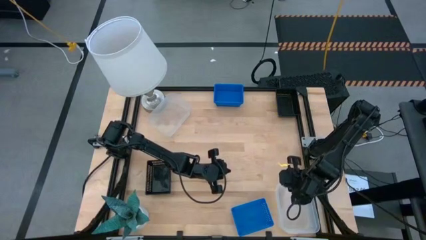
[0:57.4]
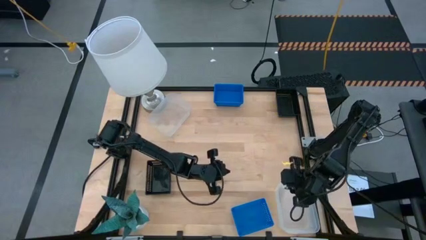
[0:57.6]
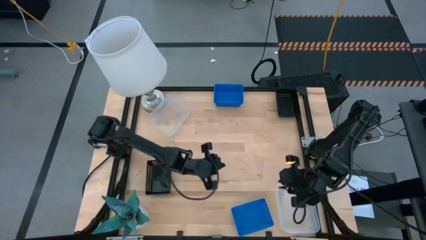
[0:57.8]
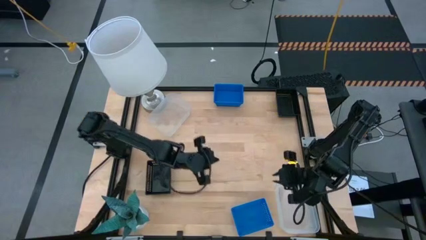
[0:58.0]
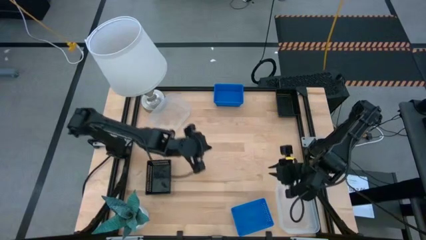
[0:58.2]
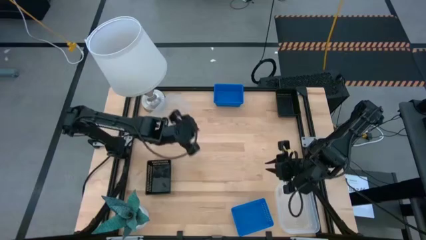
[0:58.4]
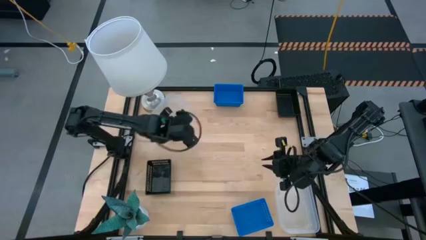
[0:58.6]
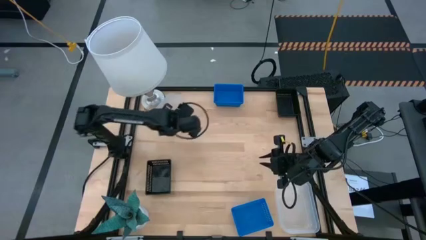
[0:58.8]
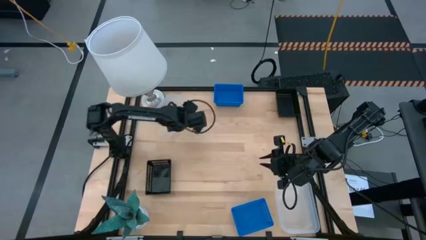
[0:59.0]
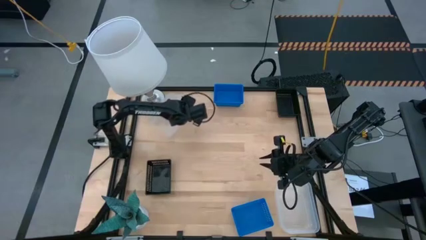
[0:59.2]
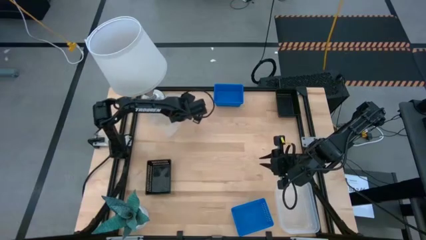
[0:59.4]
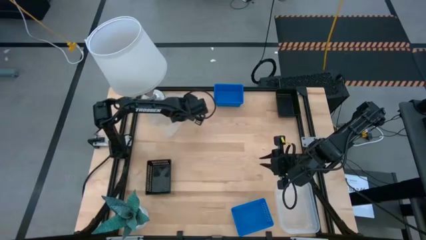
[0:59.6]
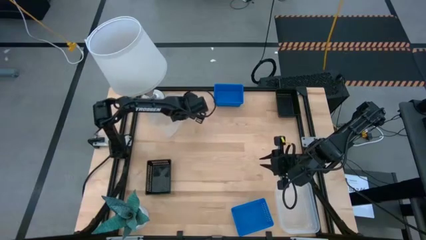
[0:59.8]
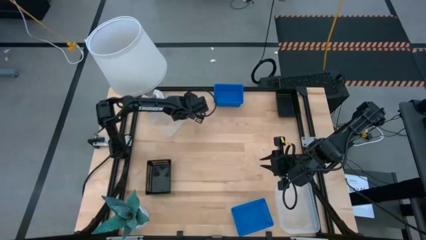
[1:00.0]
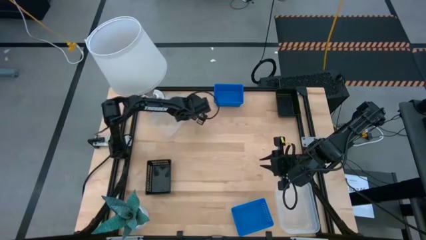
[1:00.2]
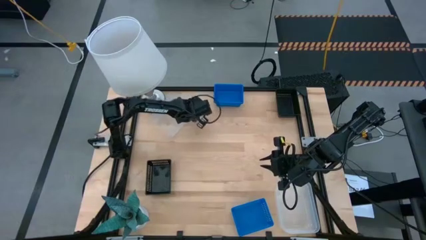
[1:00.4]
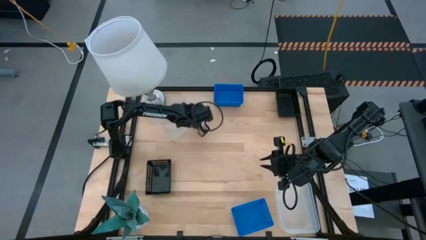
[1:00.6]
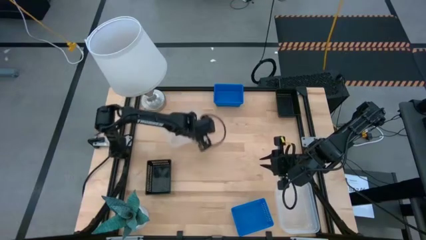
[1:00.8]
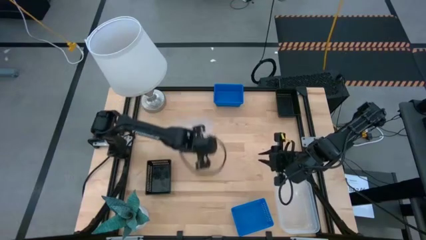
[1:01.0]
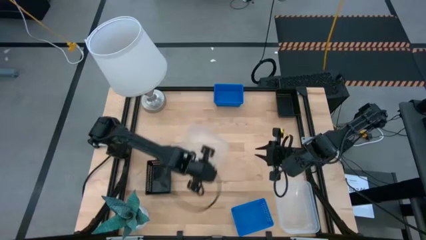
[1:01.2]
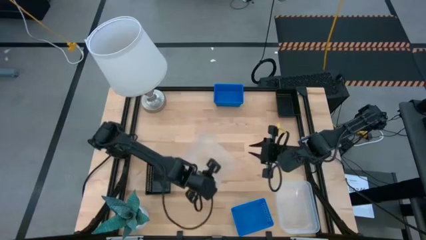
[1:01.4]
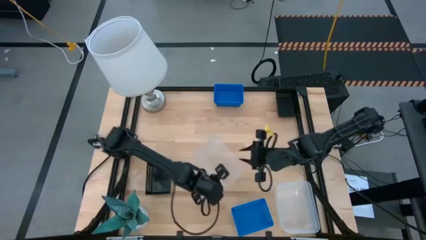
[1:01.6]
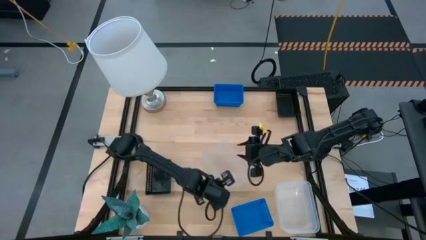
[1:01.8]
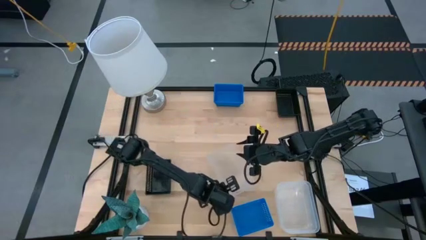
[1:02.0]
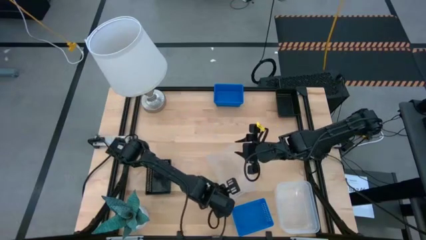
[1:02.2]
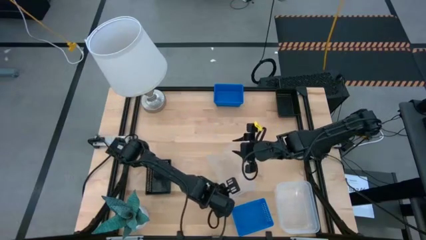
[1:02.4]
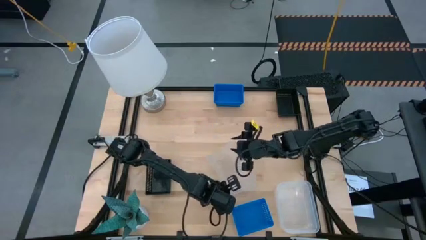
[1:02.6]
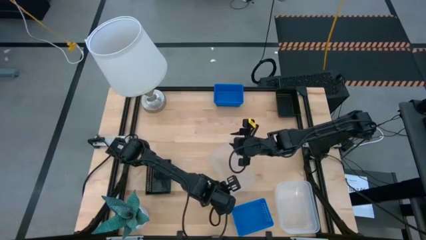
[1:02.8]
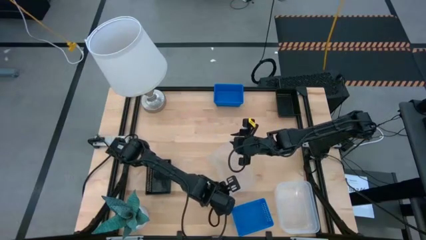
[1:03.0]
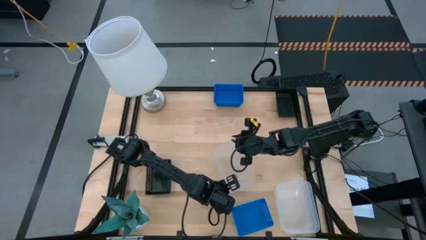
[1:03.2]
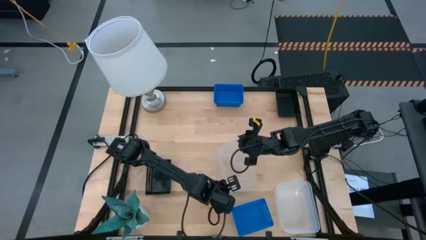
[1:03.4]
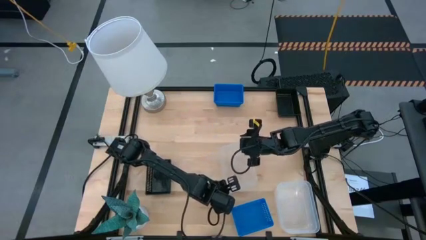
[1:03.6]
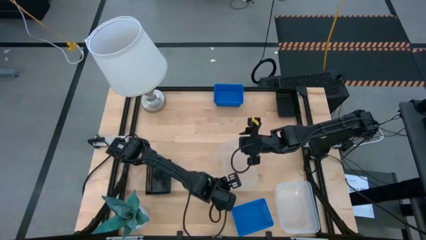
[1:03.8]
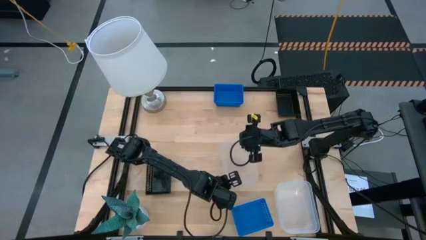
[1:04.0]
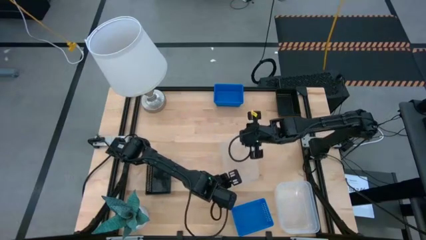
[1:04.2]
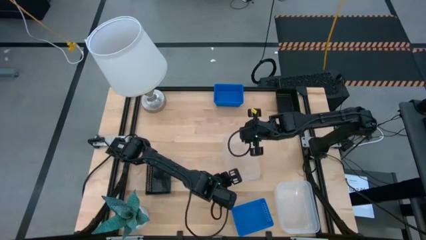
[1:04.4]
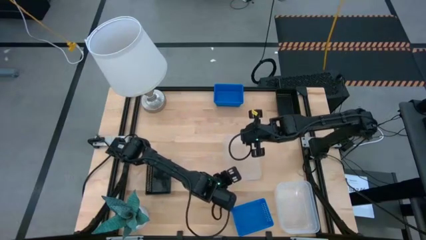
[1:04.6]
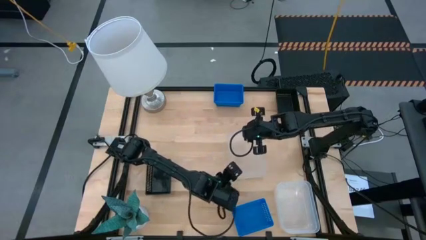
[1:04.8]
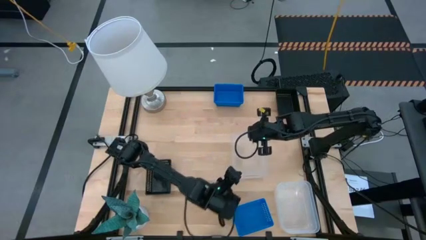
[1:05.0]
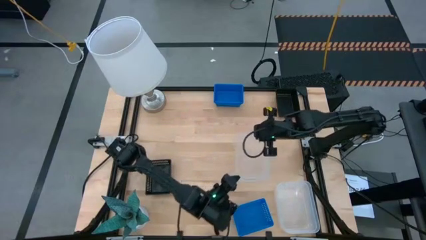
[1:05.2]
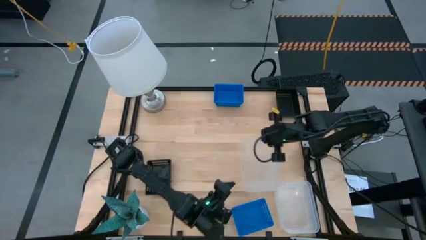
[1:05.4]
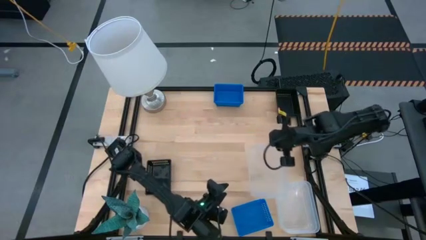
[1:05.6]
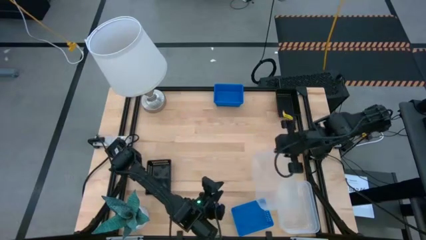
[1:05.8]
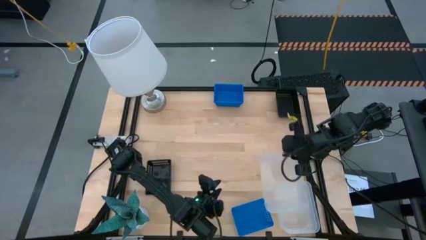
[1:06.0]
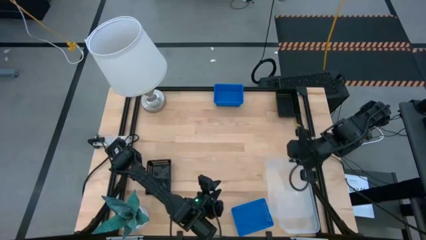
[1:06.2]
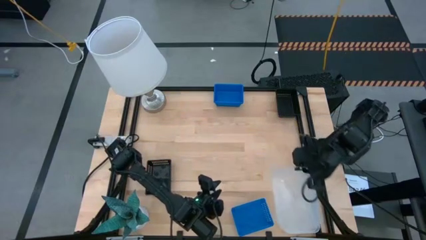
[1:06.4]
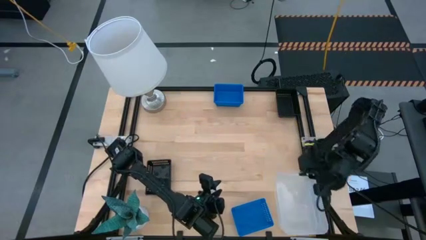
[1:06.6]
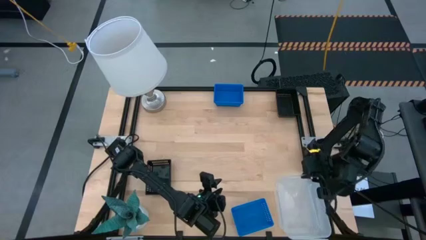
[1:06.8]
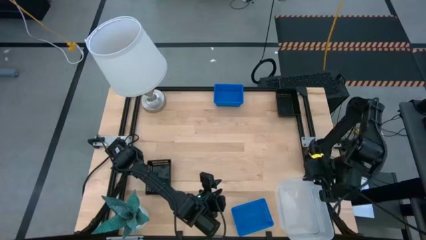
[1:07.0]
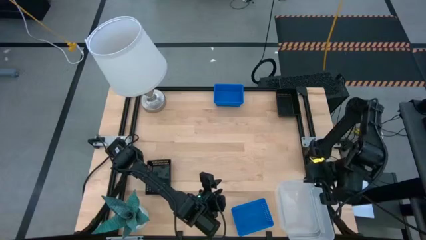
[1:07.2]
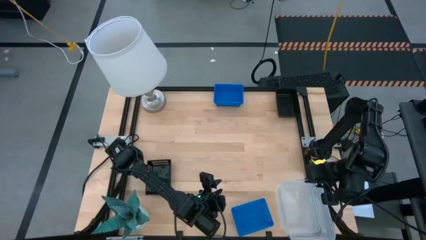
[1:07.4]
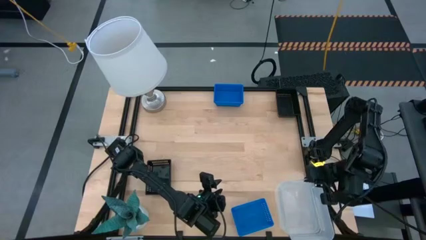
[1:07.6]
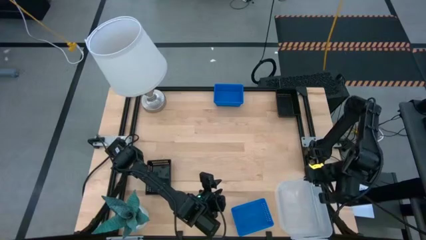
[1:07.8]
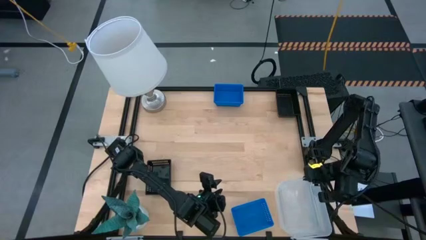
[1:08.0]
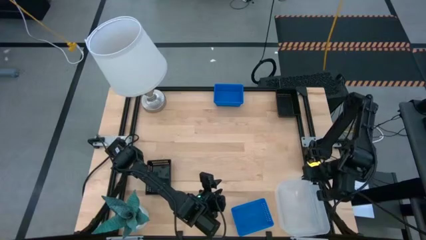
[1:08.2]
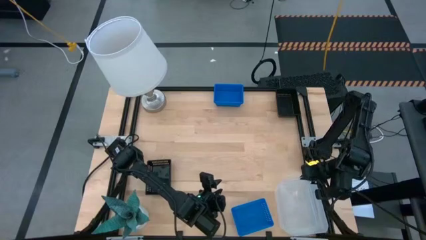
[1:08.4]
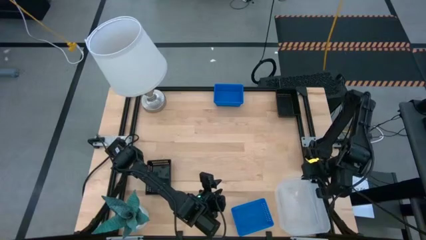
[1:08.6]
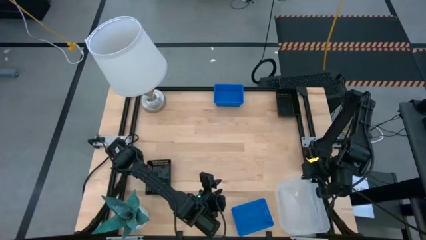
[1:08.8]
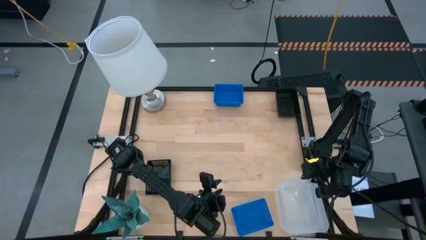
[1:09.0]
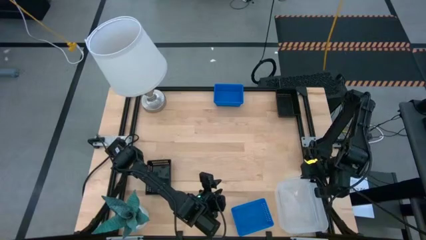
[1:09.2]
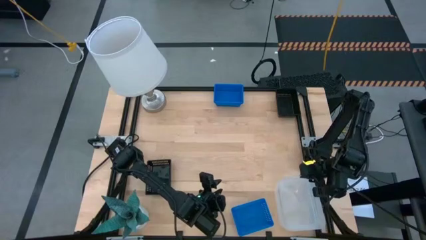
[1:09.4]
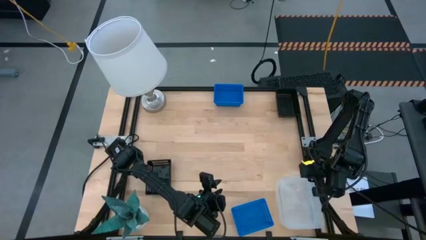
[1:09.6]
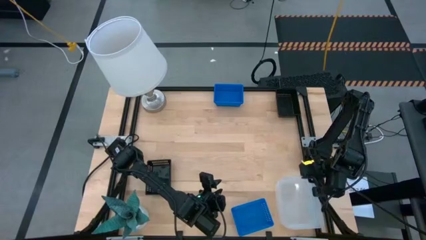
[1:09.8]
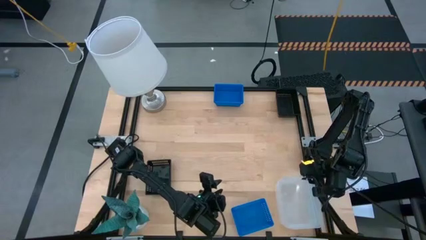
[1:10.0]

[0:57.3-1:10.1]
Stack the top transparent bin on top of the bottom transparent bin
